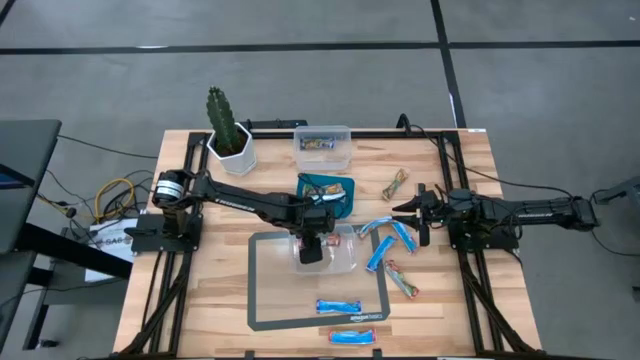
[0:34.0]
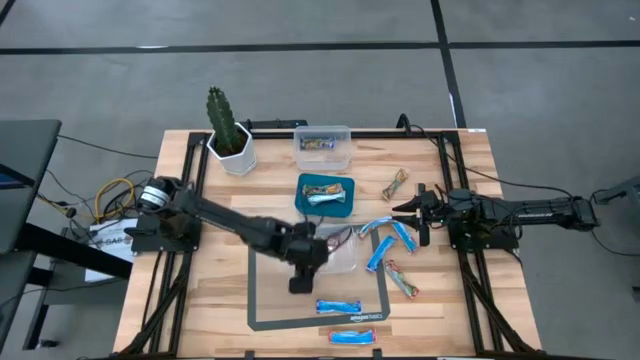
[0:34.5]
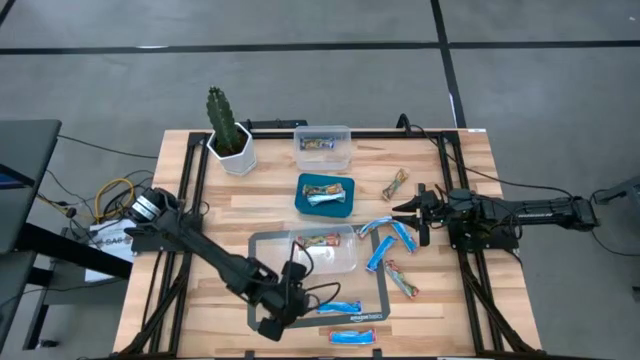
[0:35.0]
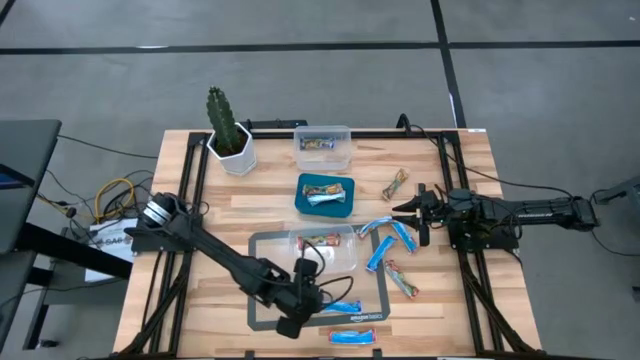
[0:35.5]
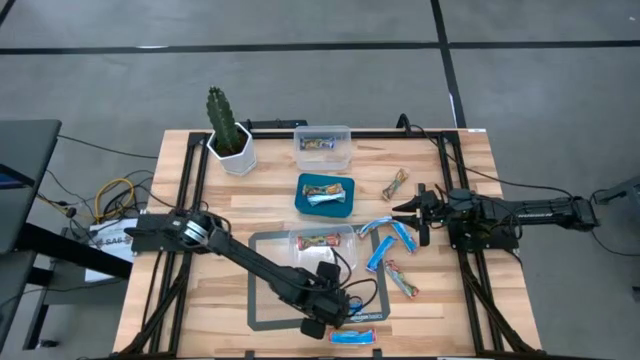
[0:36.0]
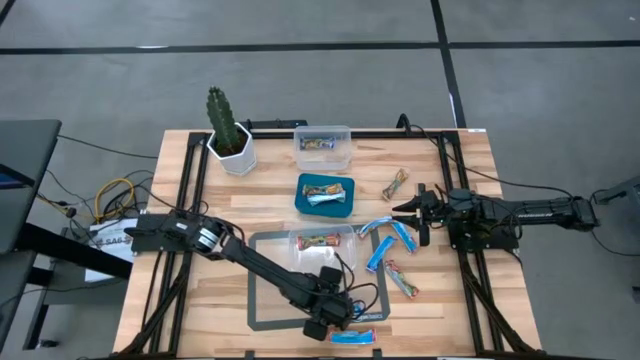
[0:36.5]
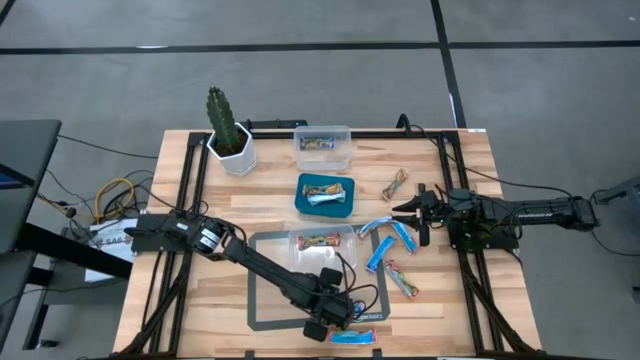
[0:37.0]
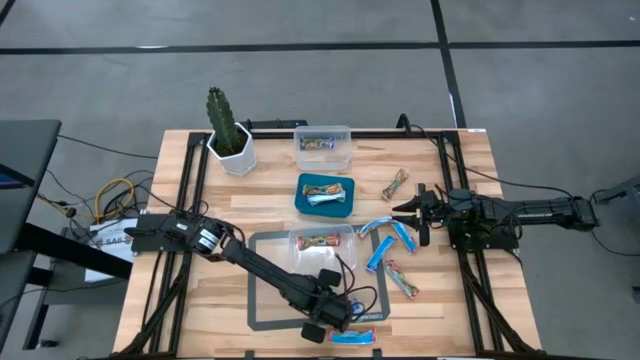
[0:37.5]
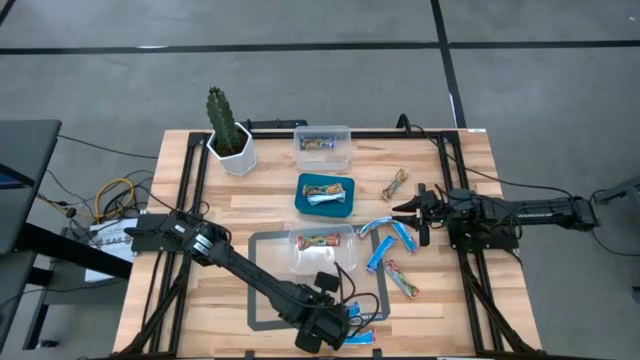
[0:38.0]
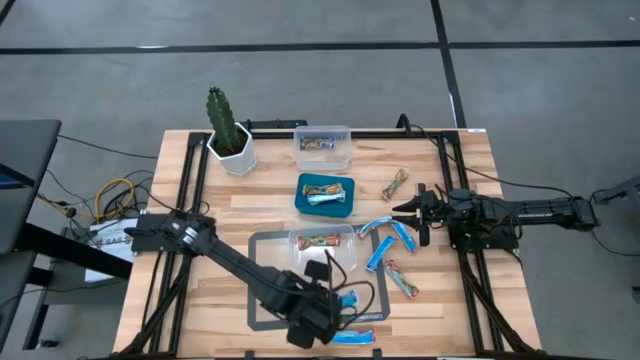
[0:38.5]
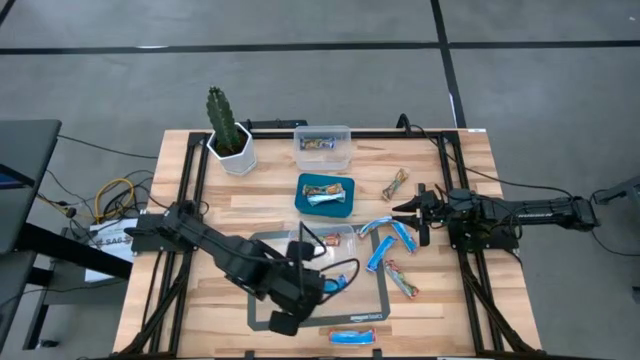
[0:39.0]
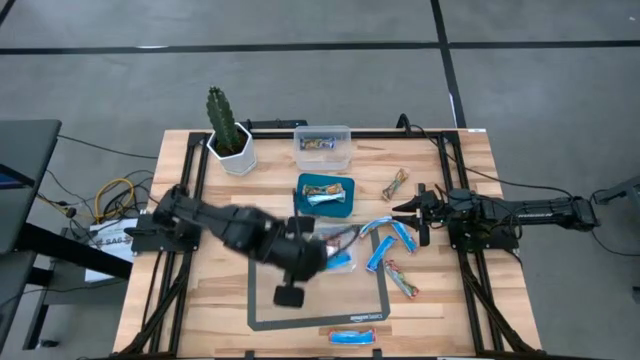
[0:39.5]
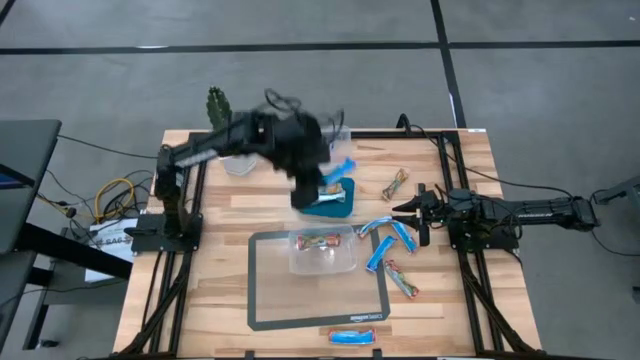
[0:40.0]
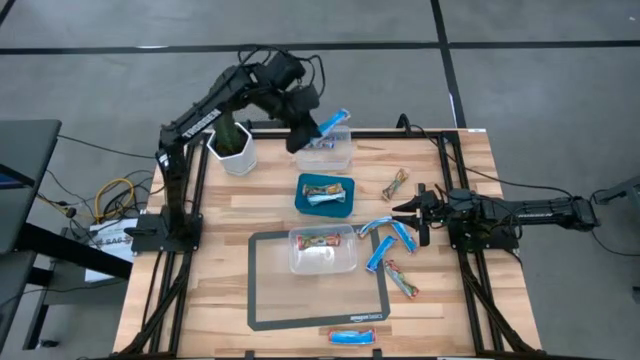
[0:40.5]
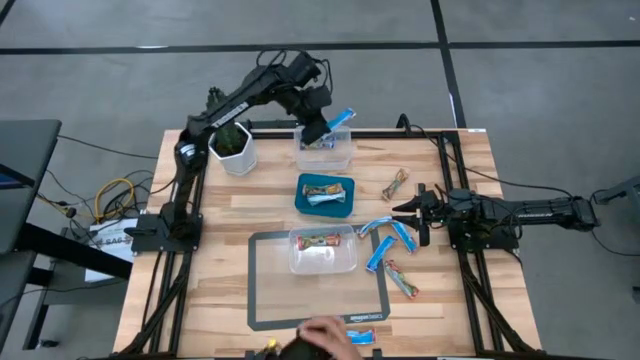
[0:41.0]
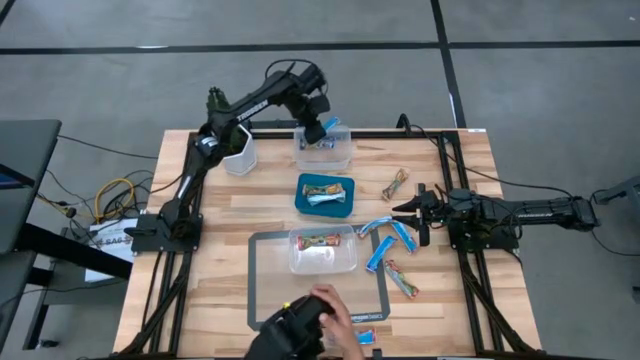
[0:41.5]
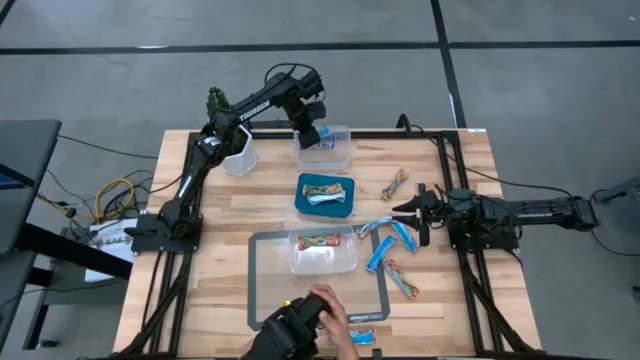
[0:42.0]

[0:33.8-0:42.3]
Task: Pick and place Granola Bars by type
Put the blue granola bar into the top transparent bin

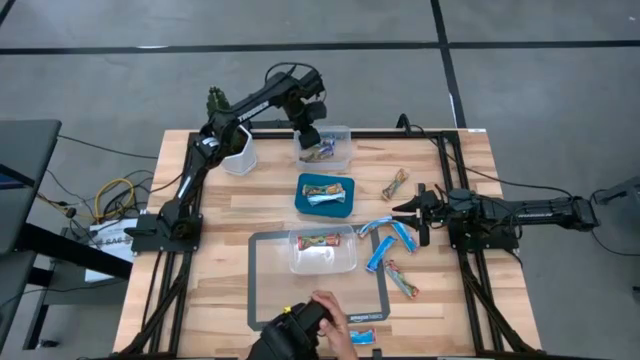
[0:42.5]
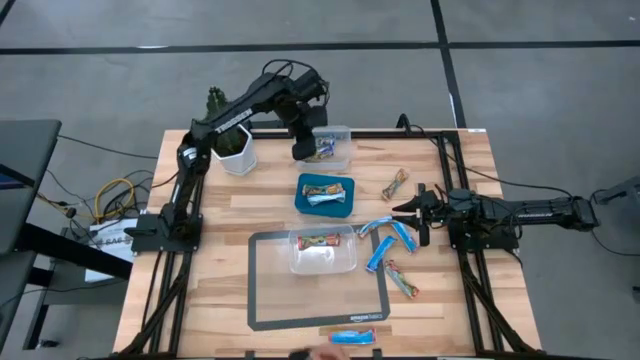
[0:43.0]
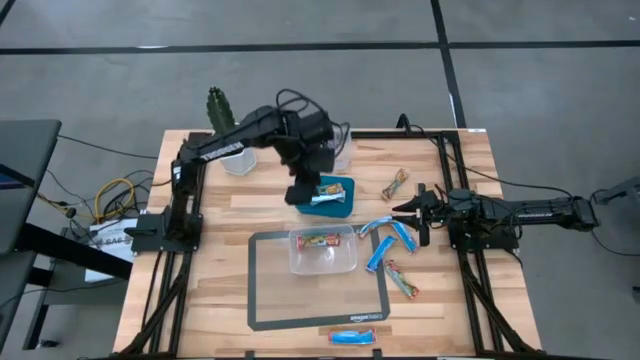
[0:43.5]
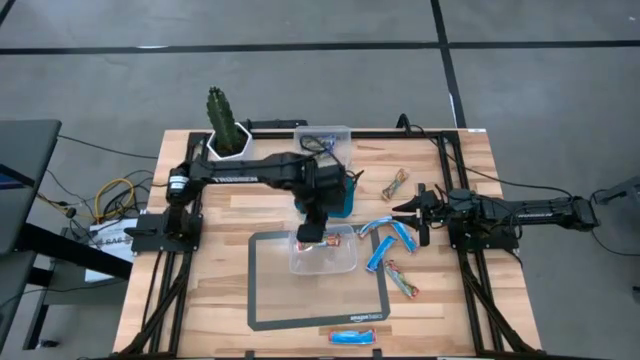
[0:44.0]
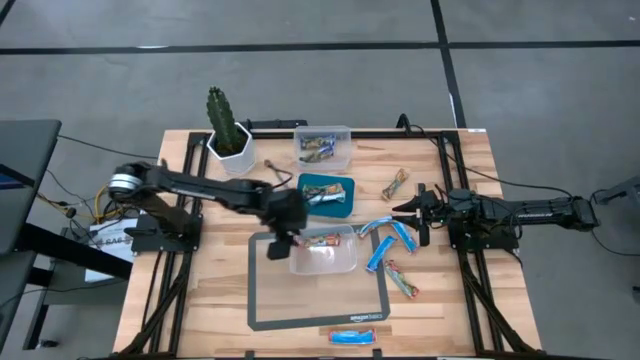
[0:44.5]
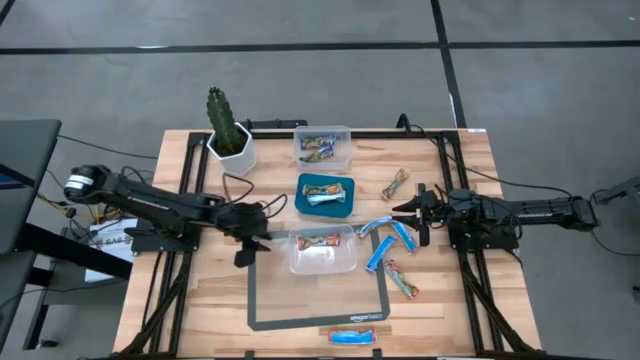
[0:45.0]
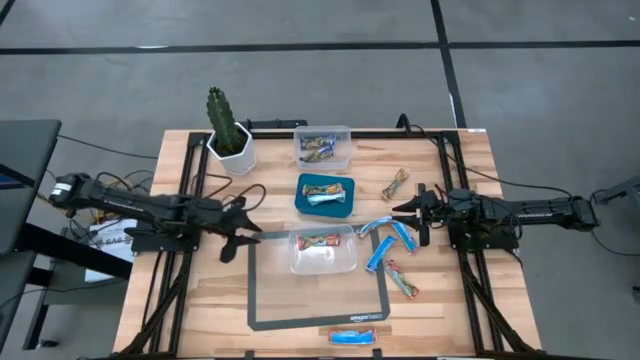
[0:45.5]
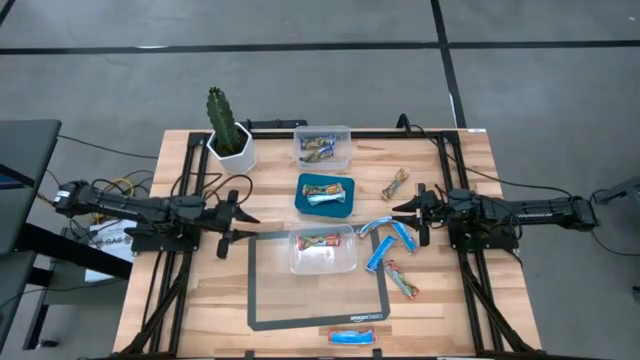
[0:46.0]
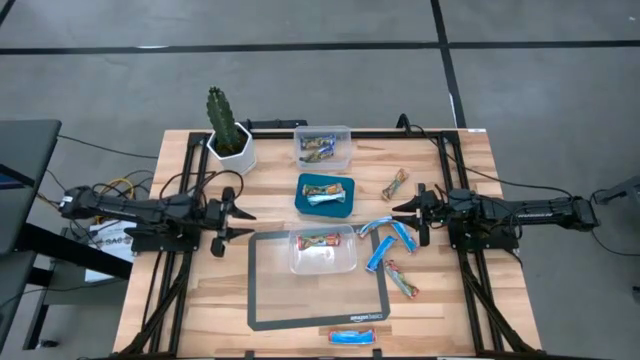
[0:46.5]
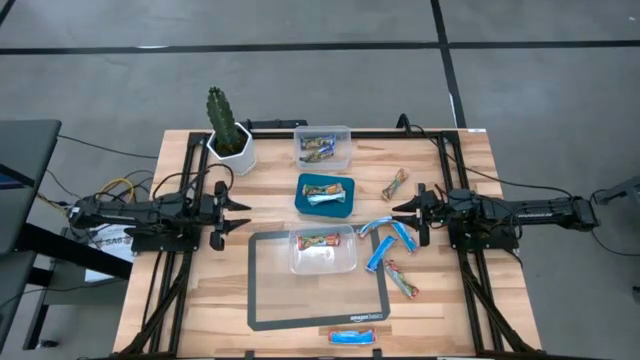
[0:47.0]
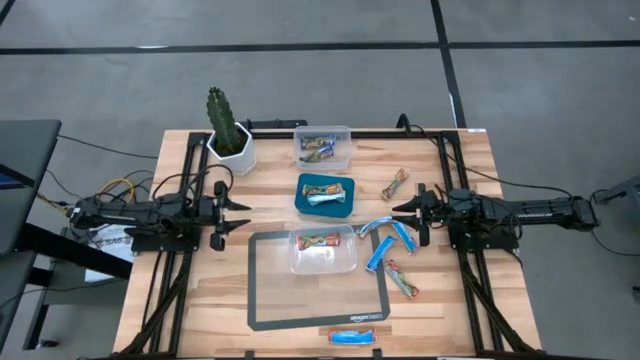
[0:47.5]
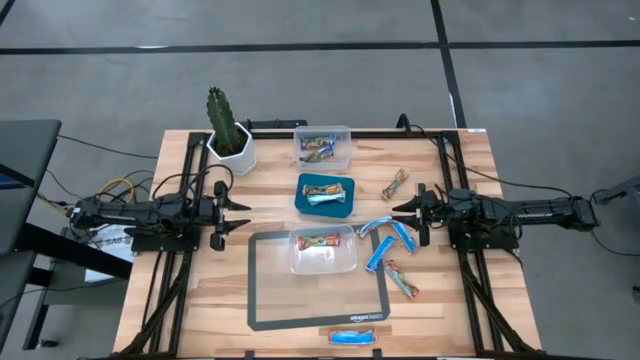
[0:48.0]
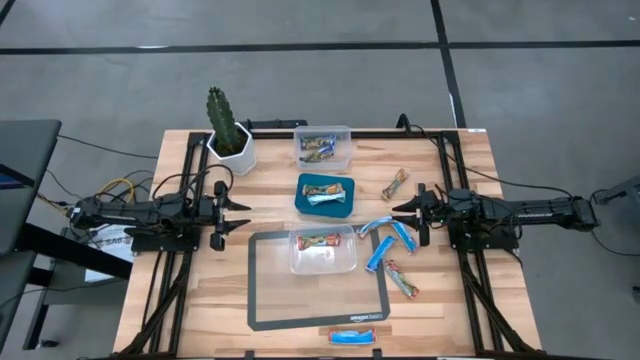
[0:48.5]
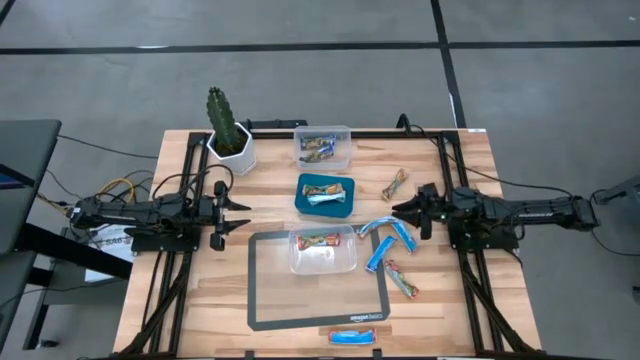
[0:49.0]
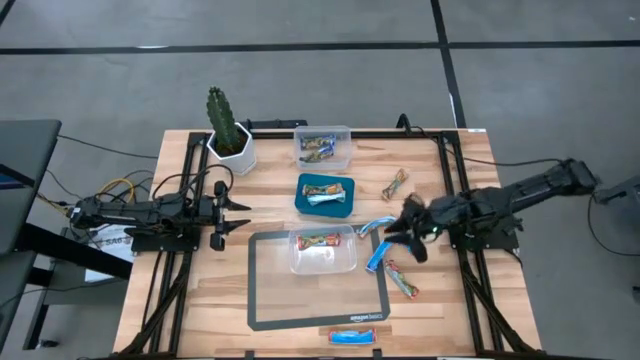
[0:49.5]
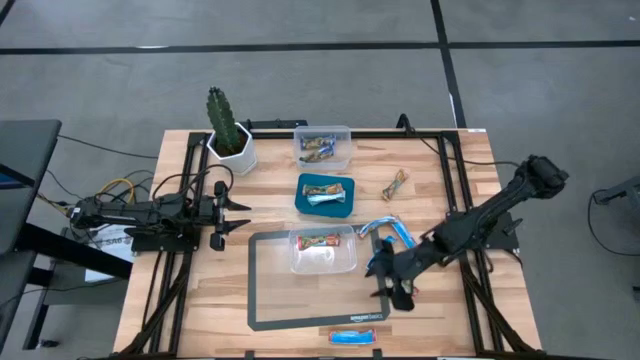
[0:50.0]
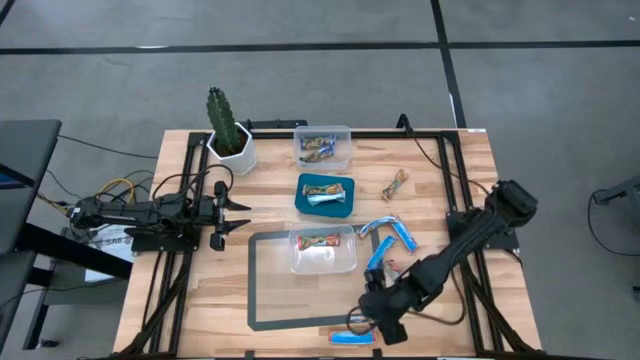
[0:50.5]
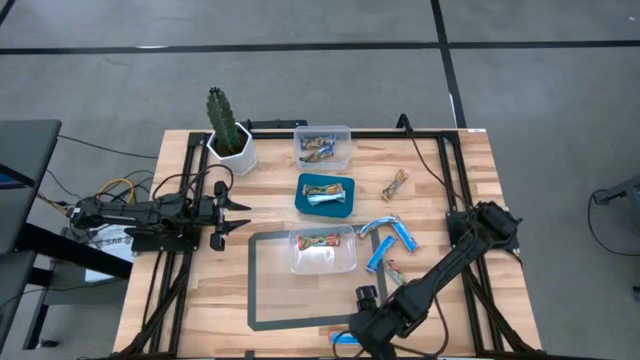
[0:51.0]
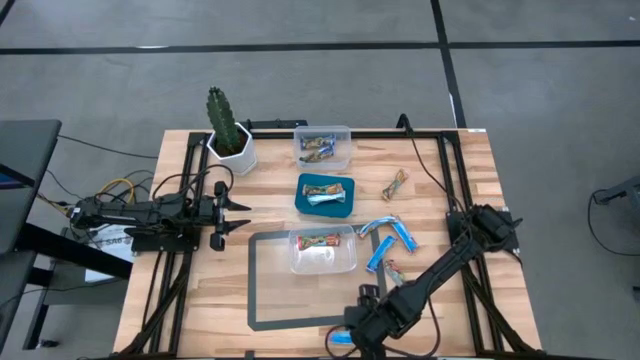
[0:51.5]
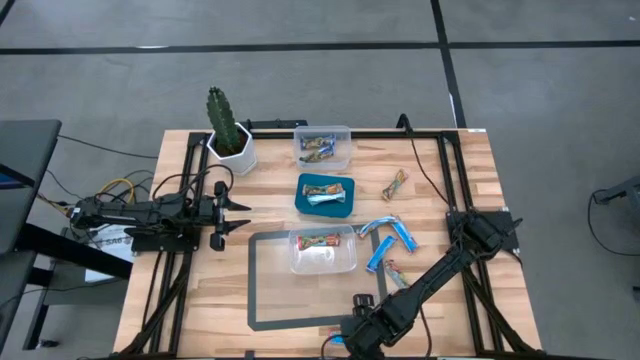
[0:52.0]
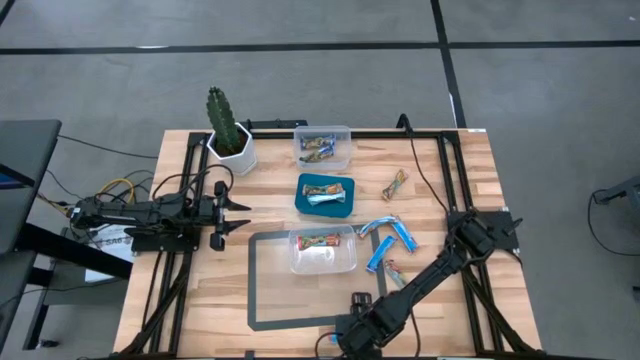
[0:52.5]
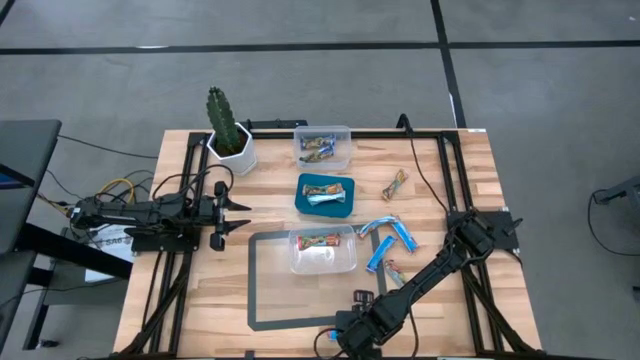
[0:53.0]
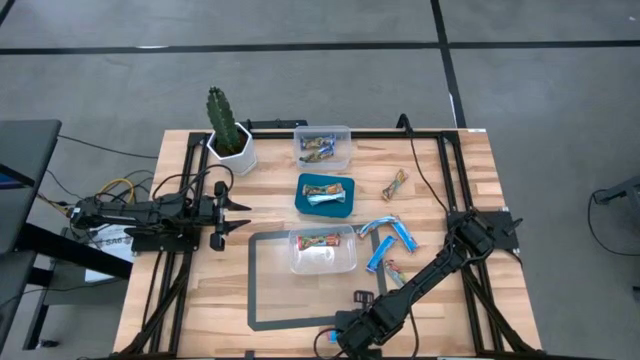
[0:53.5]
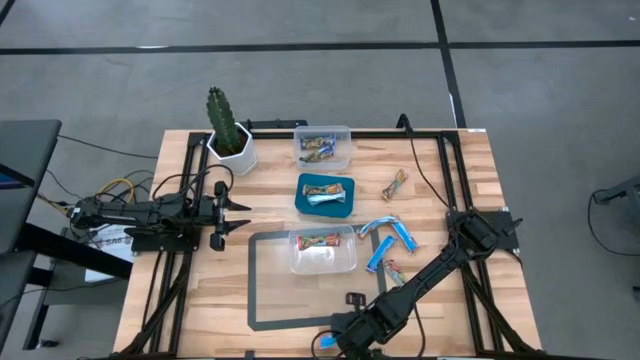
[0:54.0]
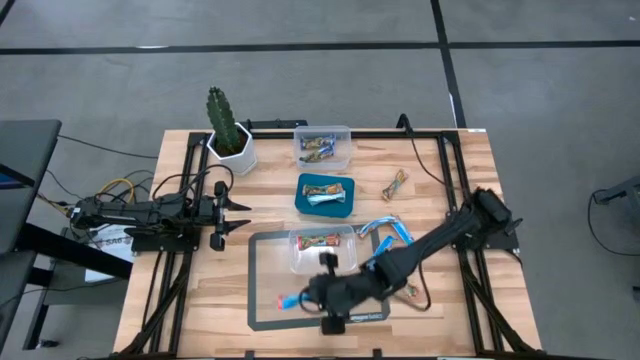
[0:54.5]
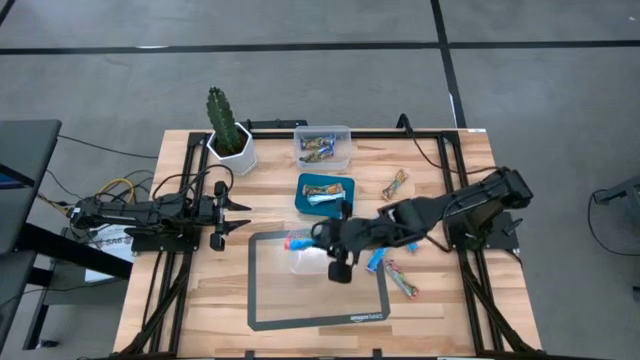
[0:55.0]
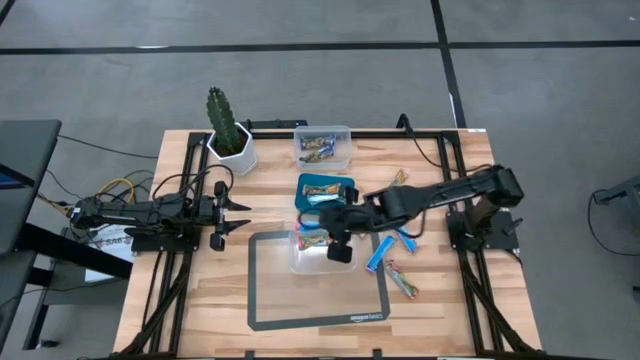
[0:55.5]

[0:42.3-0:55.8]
Put the red granola bar into the bottom transparent bin
